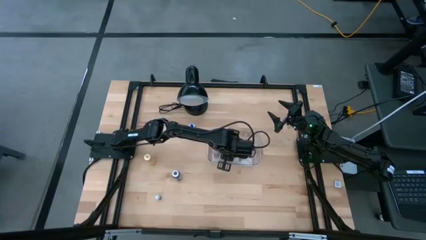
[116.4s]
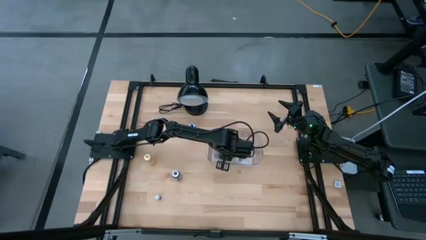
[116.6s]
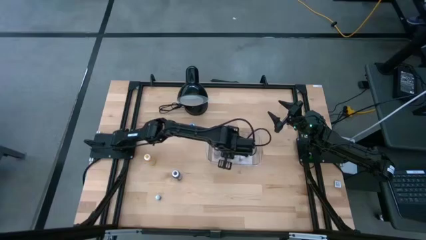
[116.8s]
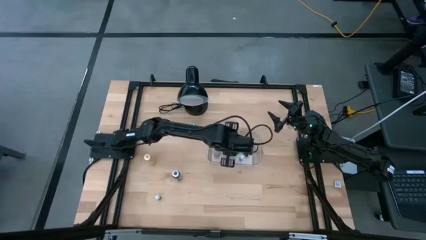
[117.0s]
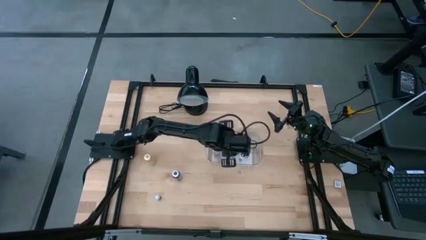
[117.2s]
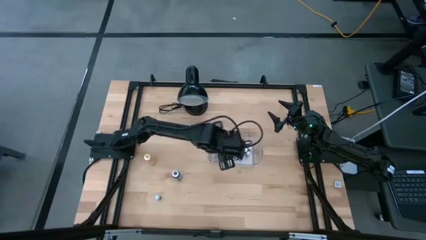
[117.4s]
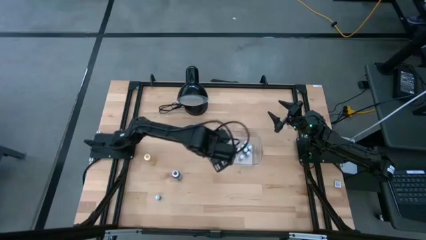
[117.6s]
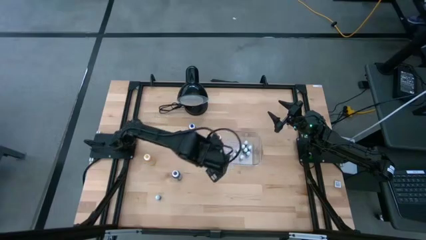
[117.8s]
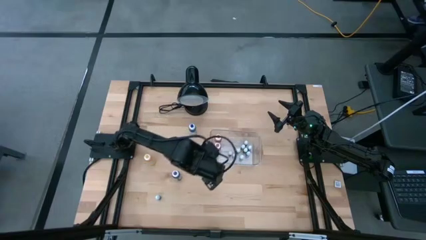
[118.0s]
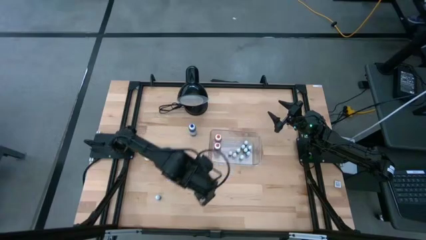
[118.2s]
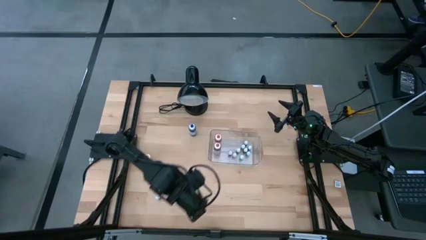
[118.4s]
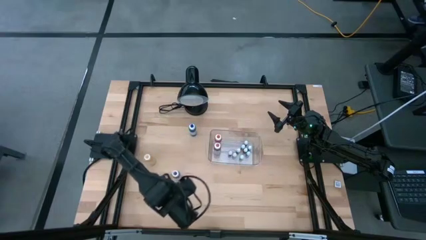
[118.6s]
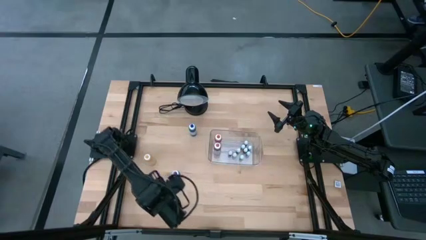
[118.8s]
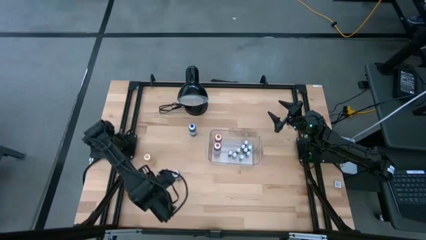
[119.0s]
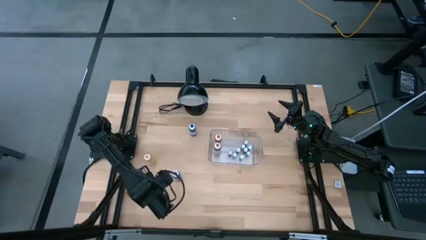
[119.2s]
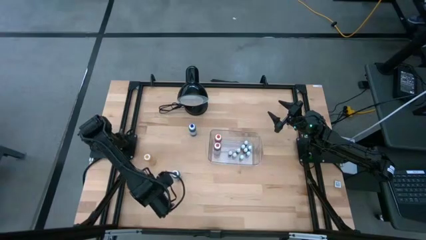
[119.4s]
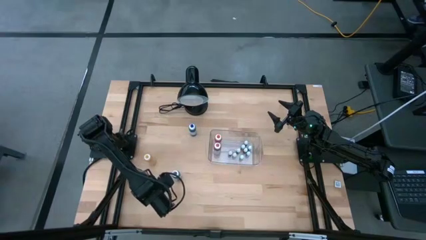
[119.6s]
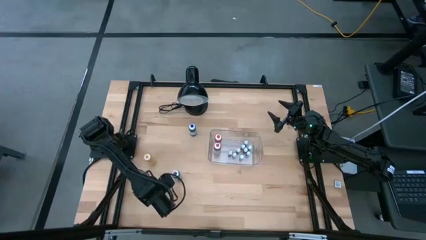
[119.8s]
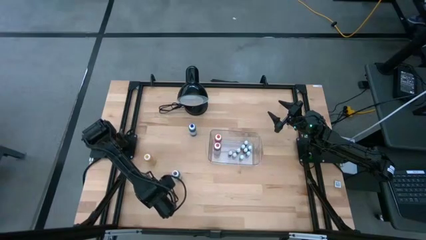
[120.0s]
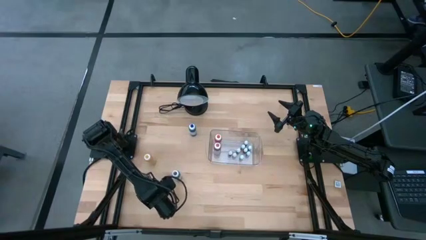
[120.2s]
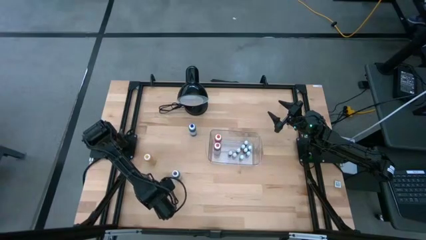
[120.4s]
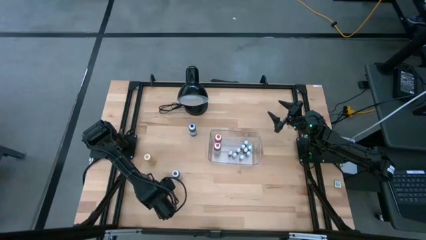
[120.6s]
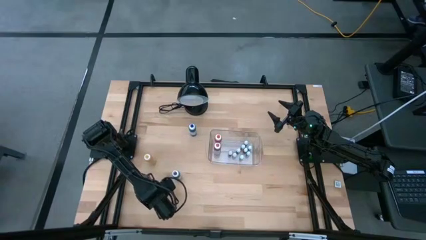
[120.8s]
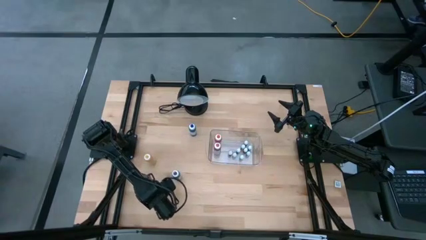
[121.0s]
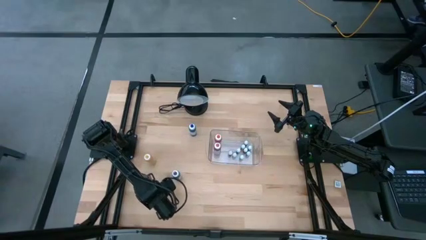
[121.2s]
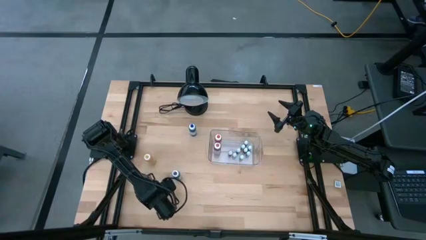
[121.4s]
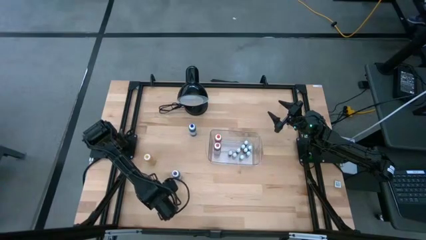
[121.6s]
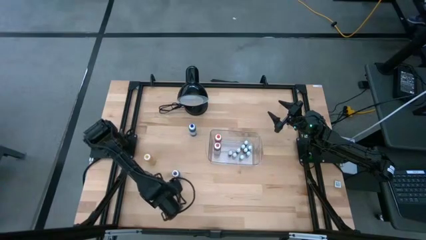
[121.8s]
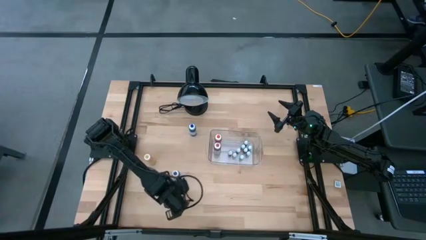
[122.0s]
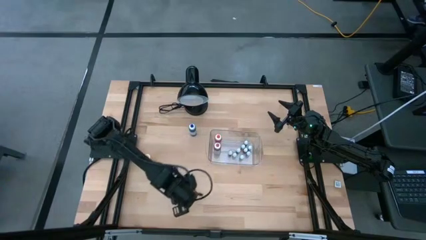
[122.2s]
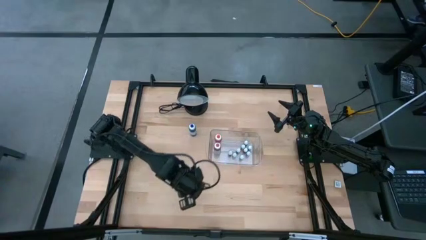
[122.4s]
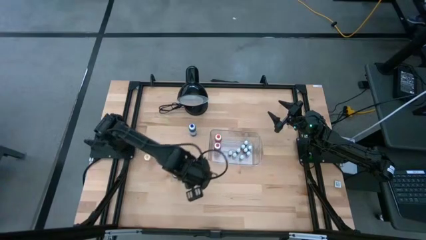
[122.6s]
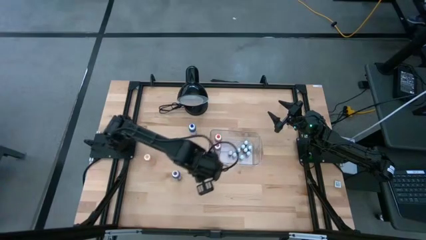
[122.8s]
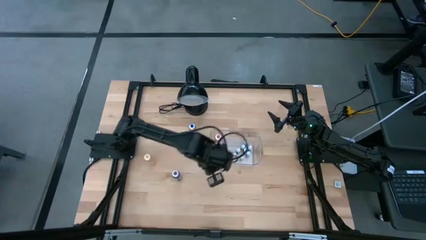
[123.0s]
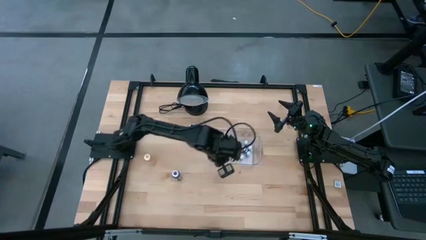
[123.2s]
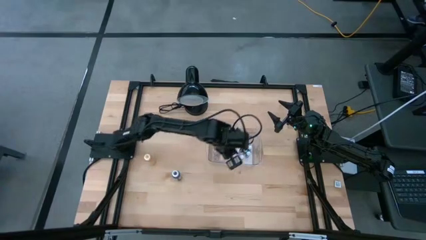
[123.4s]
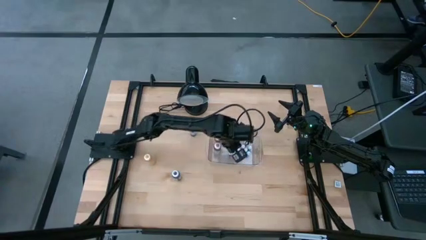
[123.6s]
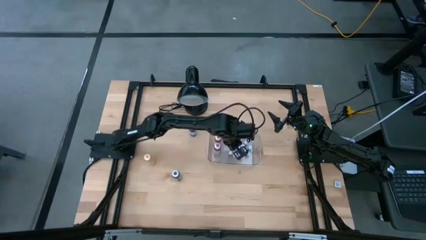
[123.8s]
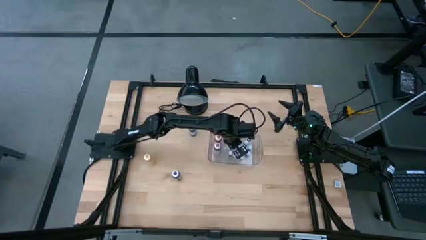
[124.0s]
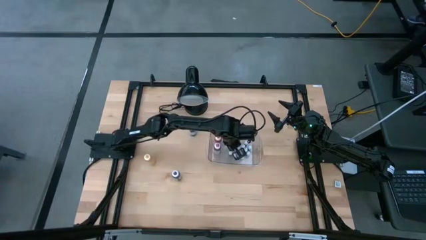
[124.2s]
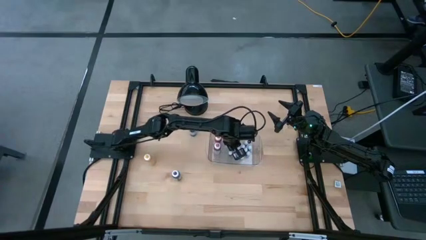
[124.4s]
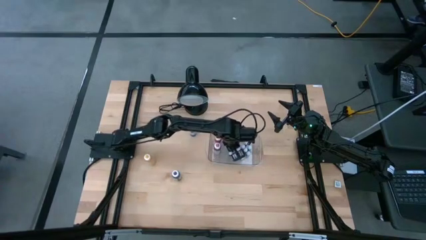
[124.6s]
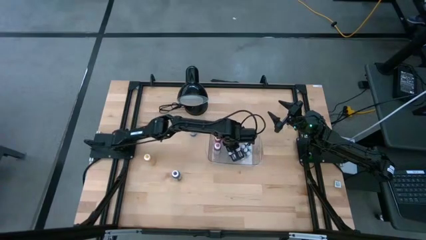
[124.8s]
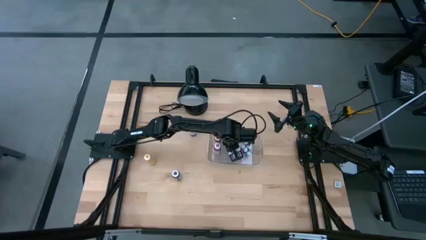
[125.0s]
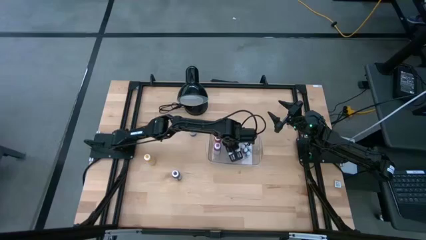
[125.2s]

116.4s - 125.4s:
Task: Pick & Place food coloring
Put the small blue food coloring bottle into the transparent bin

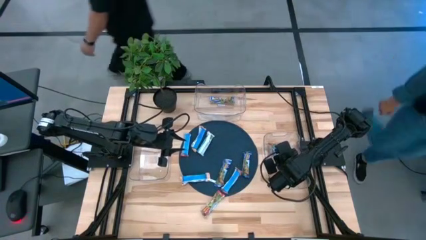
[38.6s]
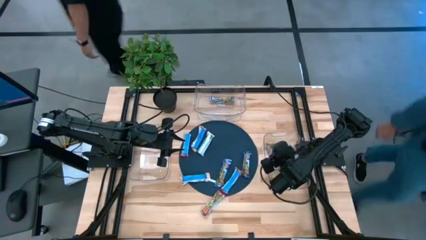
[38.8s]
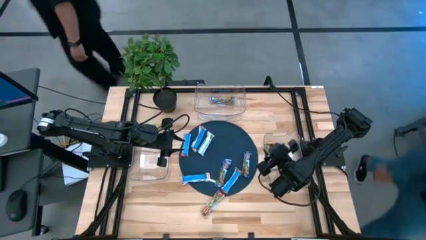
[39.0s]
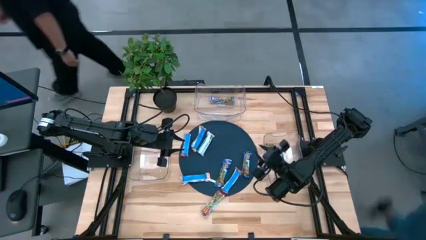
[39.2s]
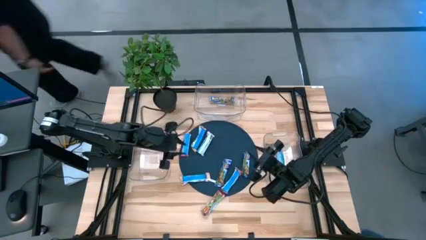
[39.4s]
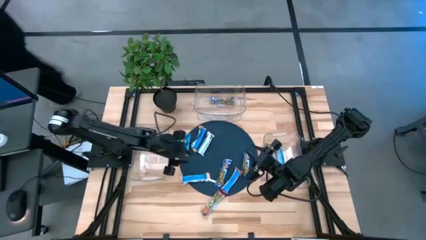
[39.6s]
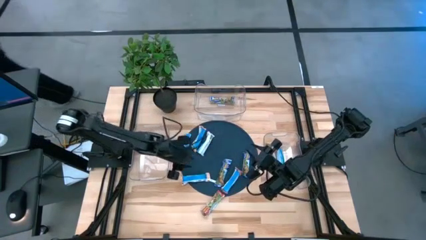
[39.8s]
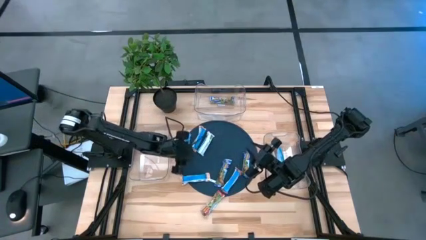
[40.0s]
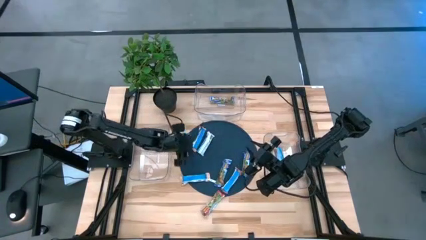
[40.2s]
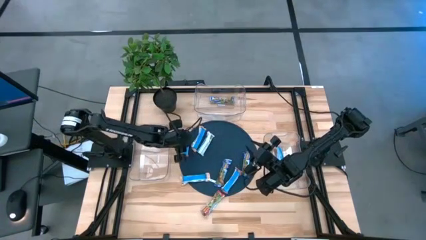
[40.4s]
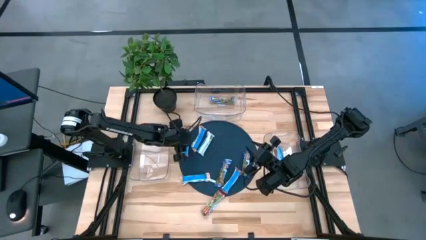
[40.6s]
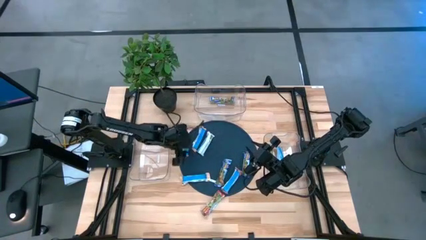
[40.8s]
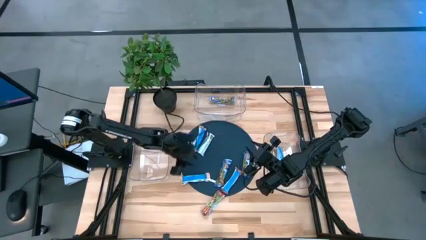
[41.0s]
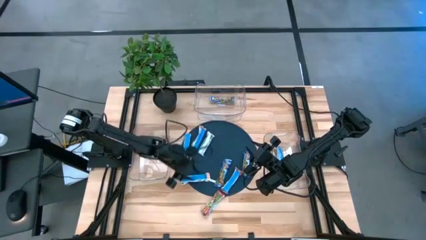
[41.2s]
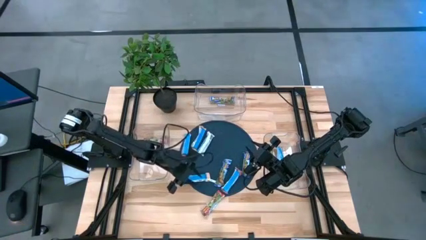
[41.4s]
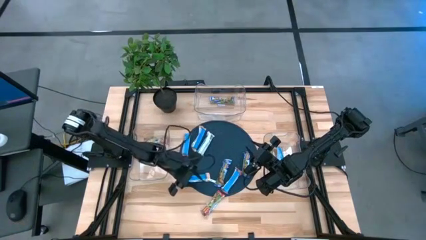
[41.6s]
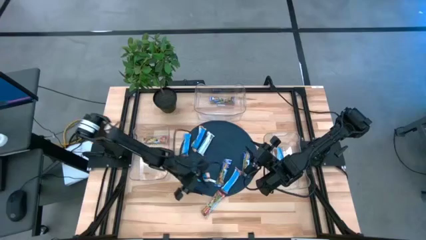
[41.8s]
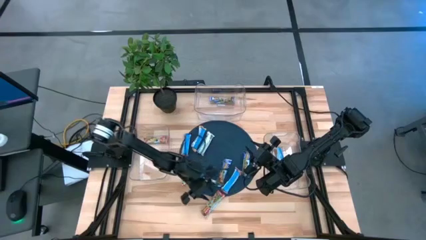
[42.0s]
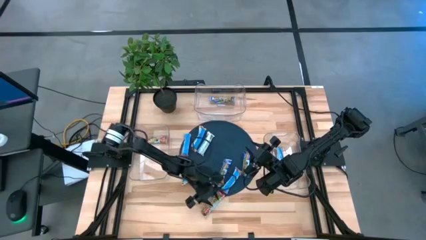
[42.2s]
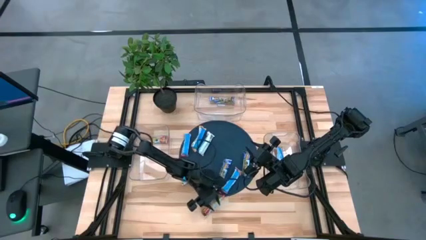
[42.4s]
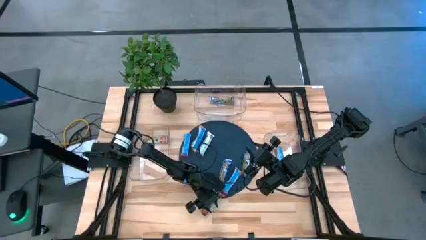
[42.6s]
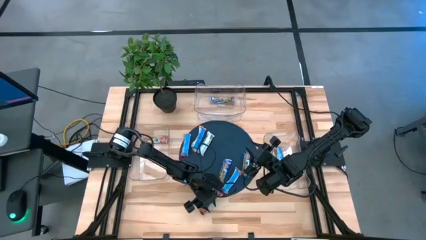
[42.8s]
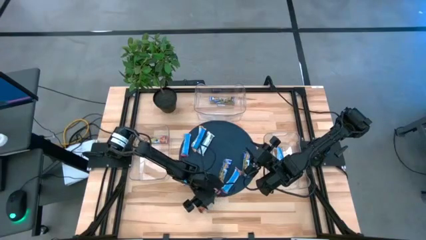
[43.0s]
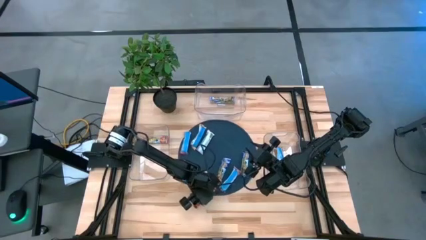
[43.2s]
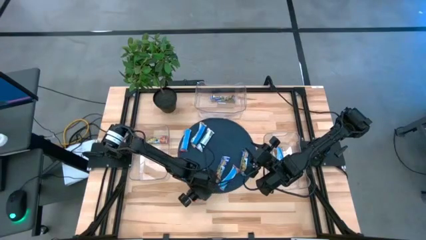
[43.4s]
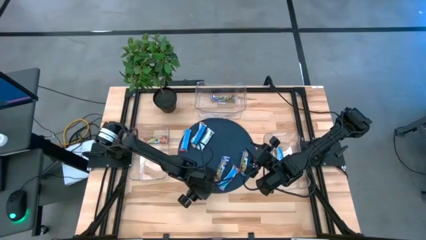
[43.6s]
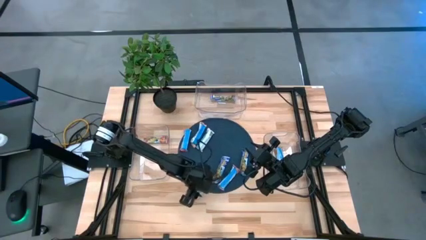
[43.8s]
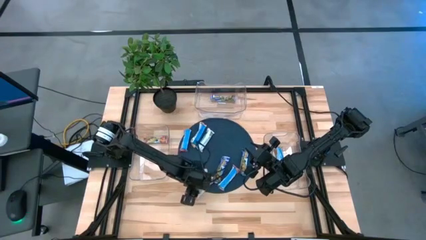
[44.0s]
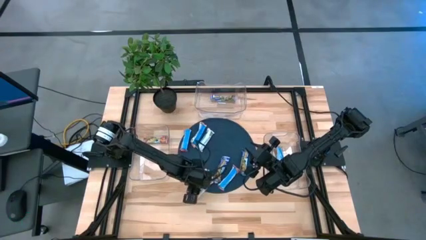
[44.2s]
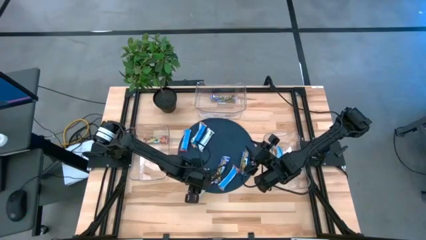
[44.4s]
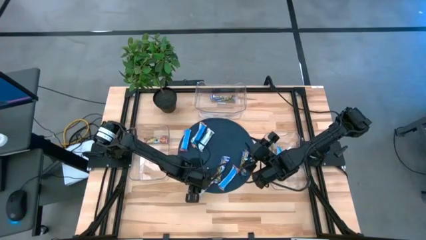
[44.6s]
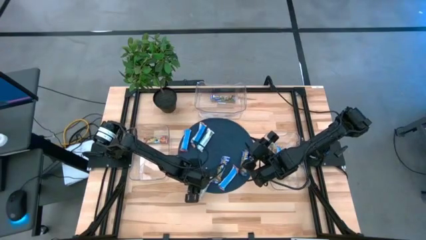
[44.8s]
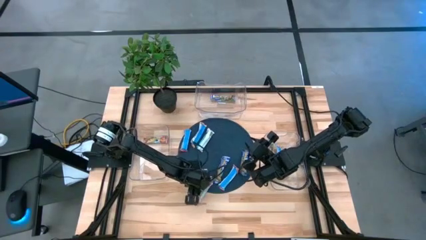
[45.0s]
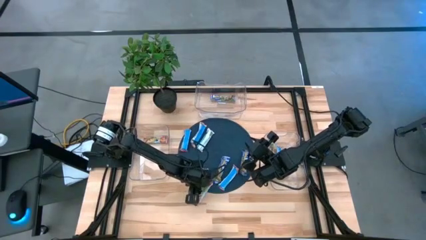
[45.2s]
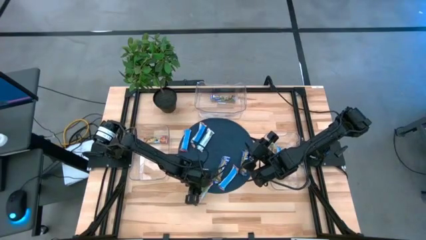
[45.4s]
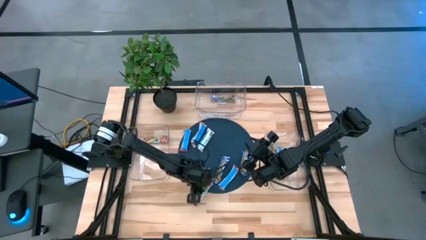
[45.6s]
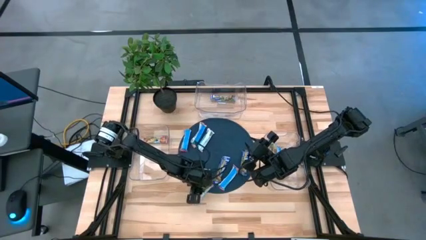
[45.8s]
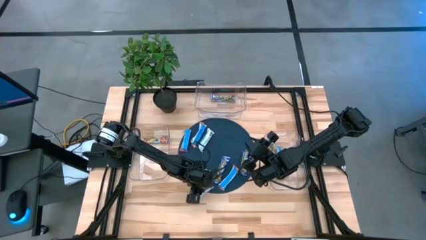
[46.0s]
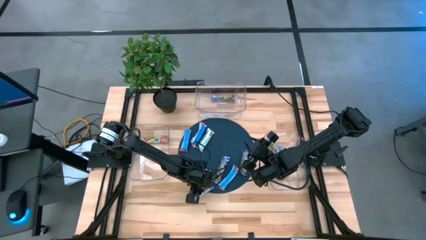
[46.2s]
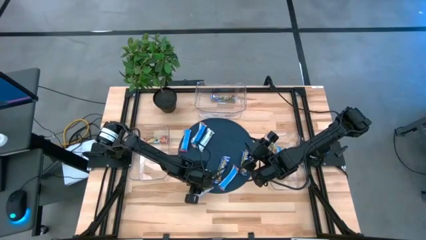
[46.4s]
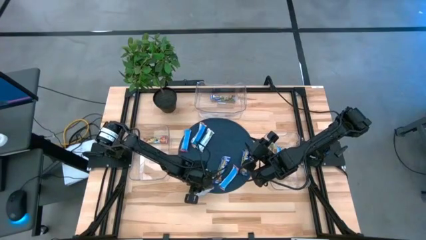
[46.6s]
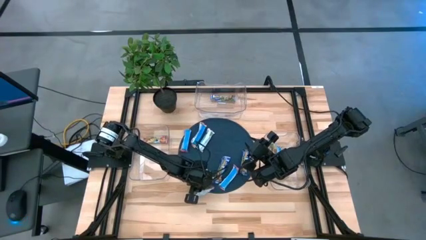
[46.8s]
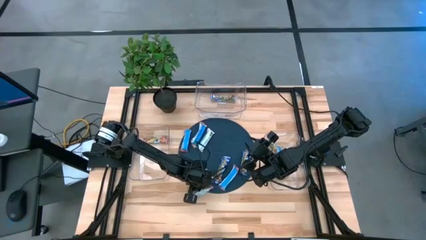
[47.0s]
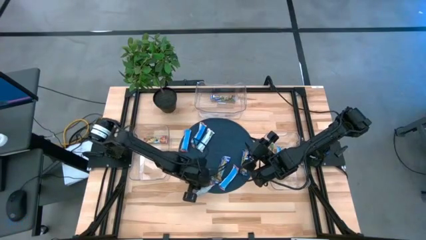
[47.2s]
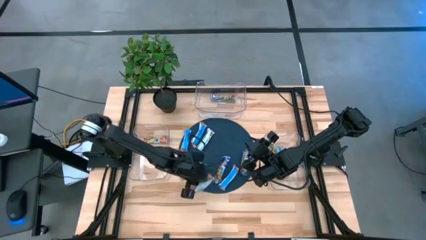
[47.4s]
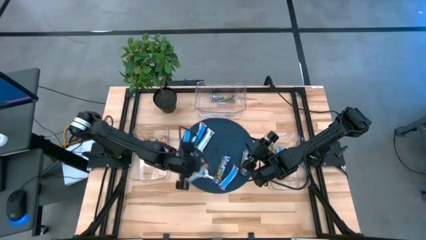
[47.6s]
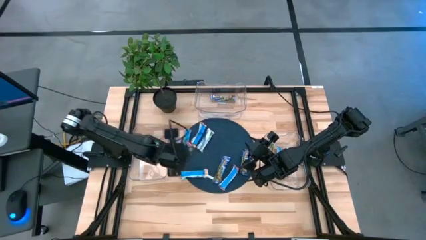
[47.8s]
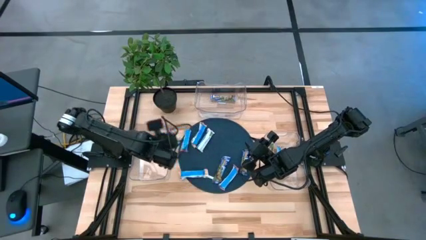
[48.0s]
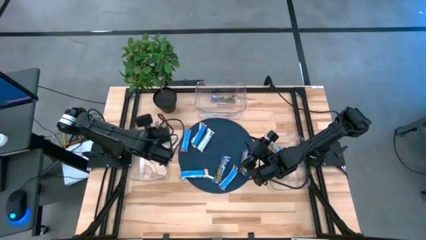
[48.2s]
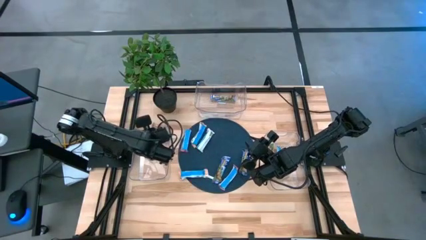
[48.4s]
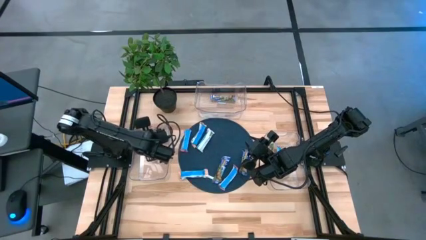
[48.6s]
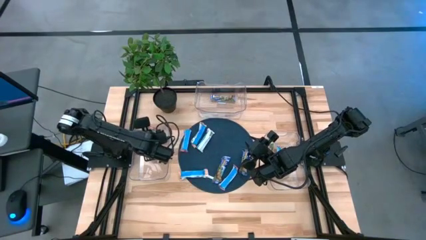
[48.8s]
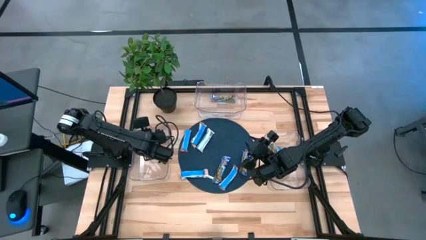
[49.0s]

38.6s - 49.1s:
Task: Pick and place Granola Bars by type
Put the bottom red granola bar into the left transparent bin
